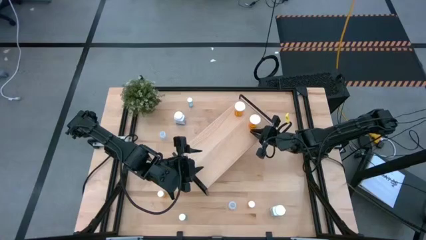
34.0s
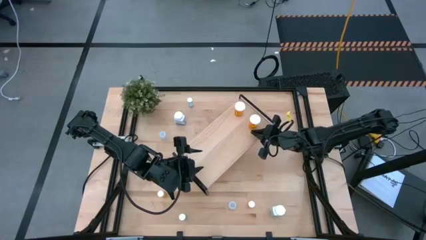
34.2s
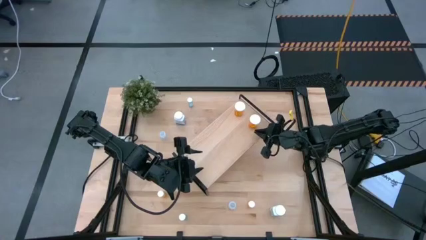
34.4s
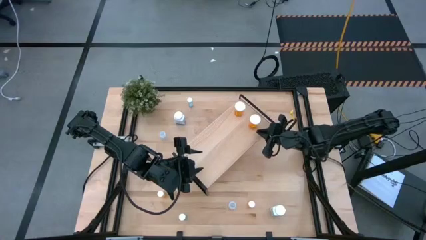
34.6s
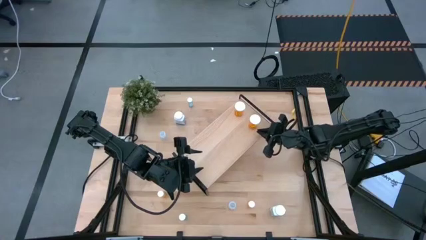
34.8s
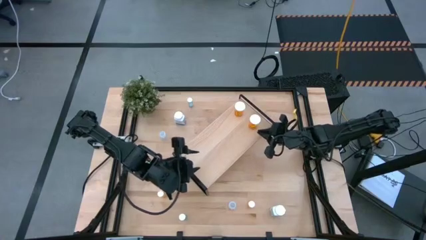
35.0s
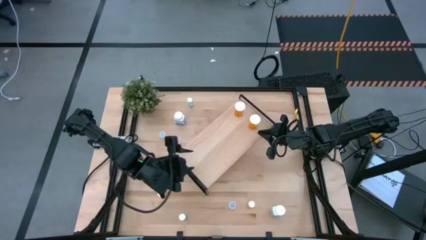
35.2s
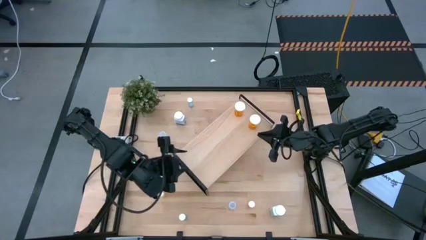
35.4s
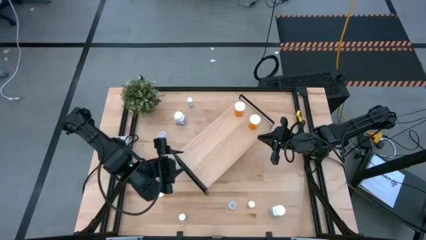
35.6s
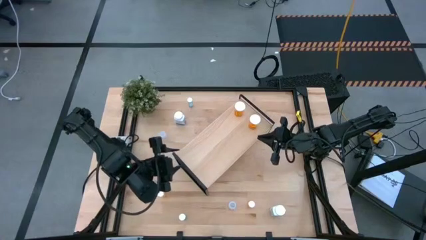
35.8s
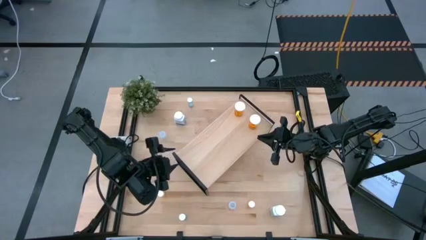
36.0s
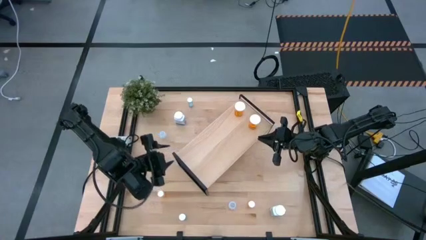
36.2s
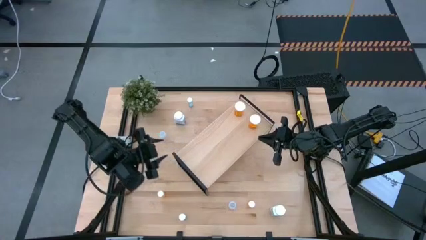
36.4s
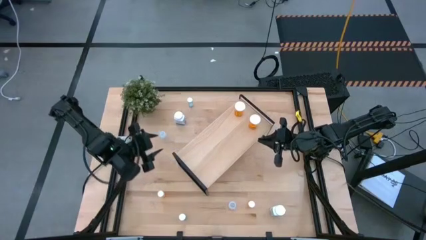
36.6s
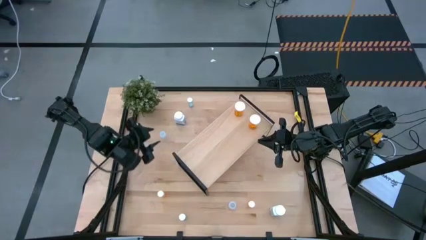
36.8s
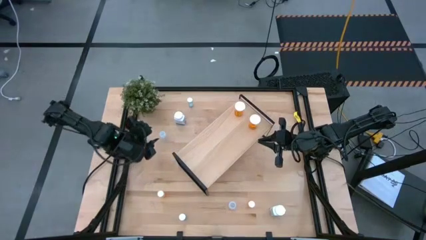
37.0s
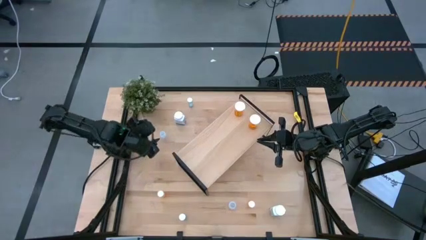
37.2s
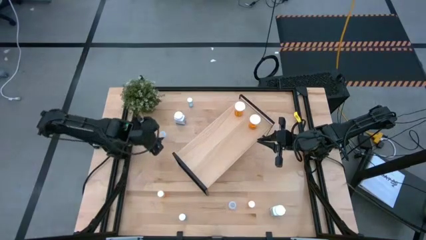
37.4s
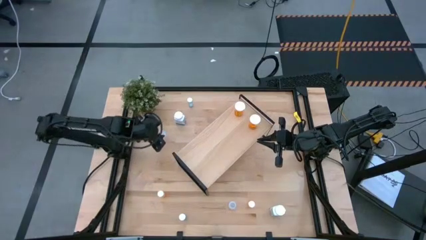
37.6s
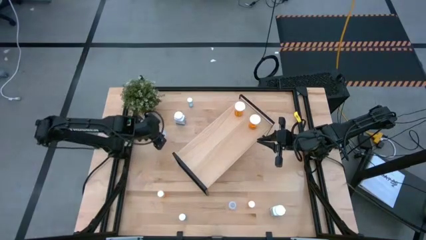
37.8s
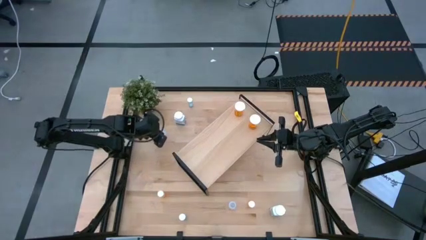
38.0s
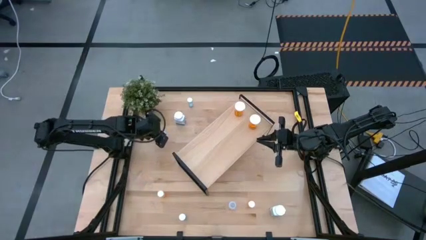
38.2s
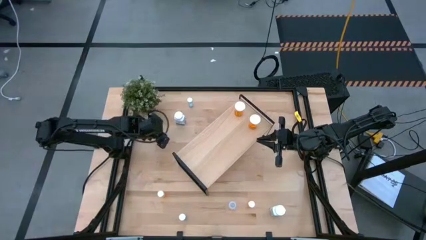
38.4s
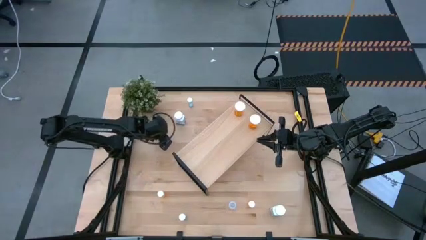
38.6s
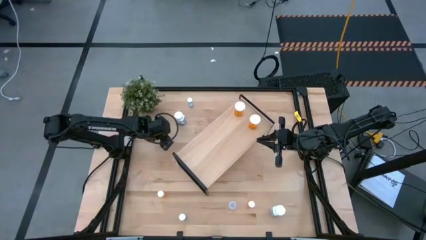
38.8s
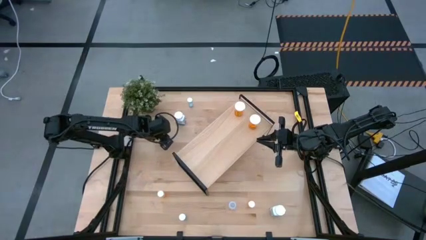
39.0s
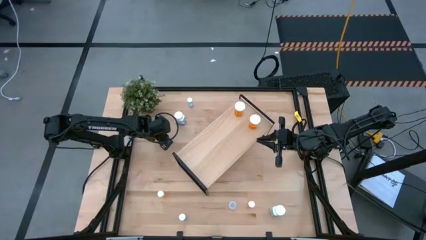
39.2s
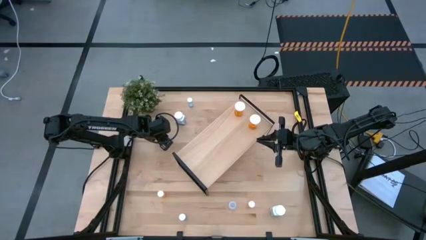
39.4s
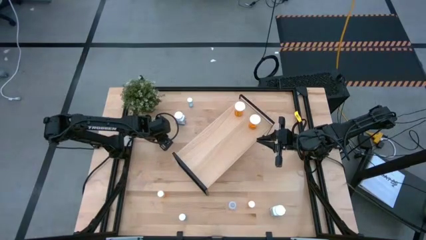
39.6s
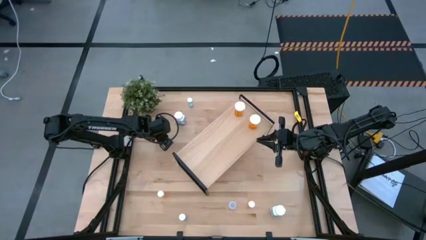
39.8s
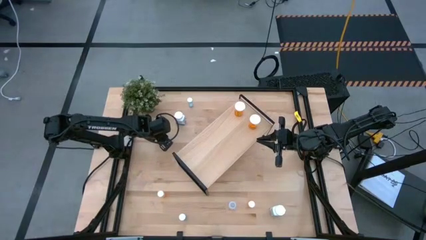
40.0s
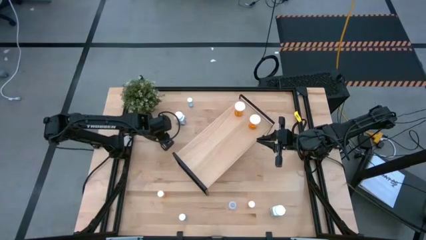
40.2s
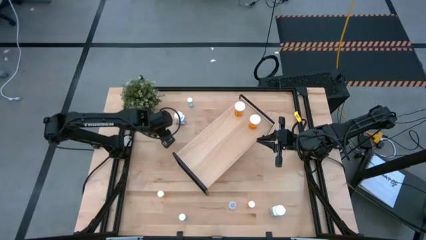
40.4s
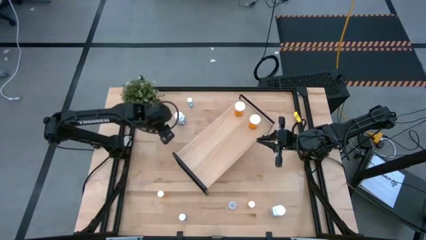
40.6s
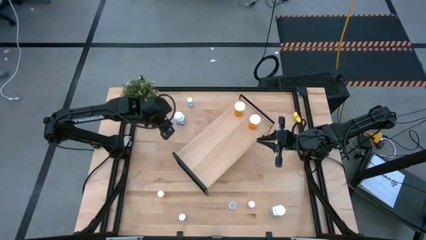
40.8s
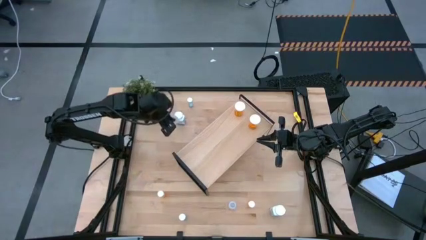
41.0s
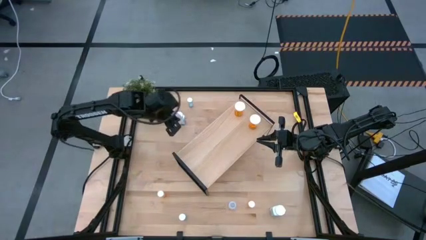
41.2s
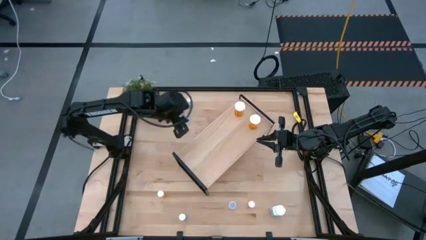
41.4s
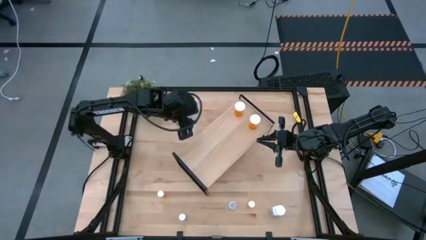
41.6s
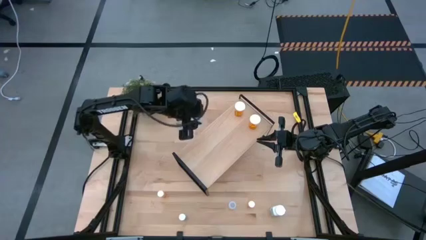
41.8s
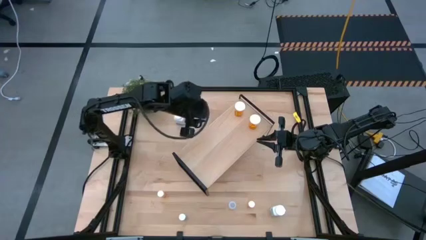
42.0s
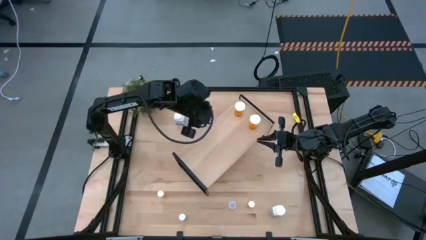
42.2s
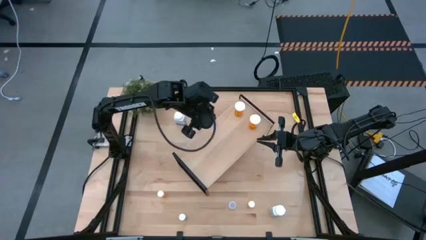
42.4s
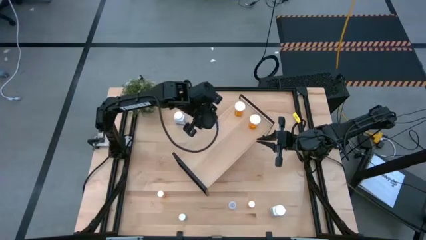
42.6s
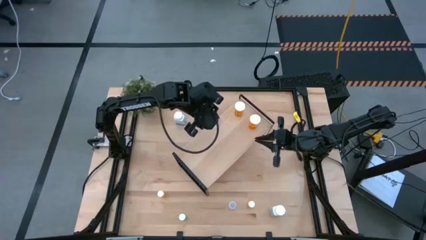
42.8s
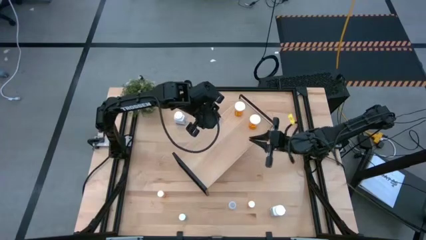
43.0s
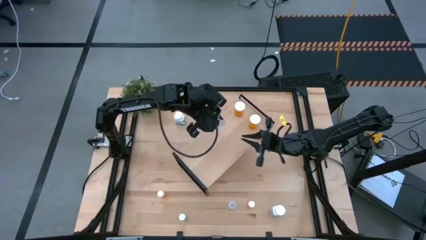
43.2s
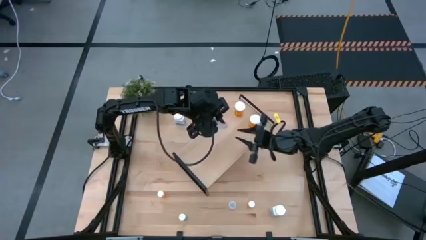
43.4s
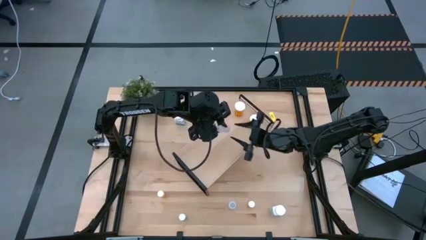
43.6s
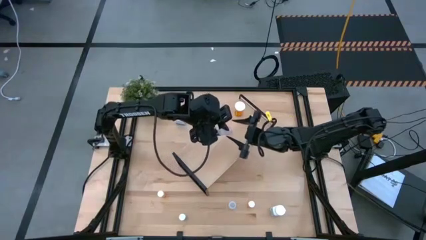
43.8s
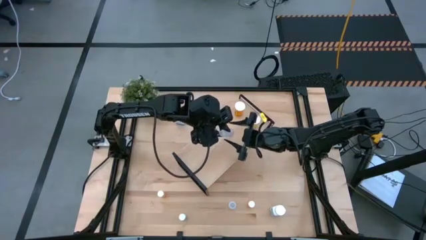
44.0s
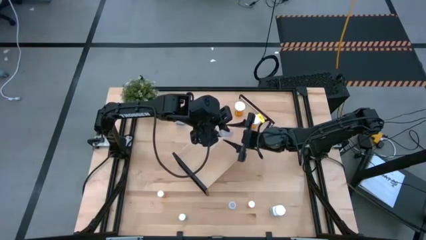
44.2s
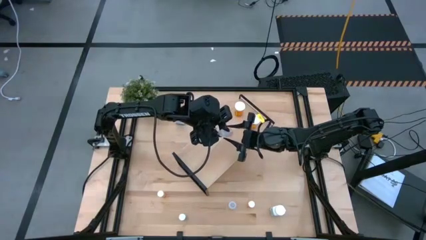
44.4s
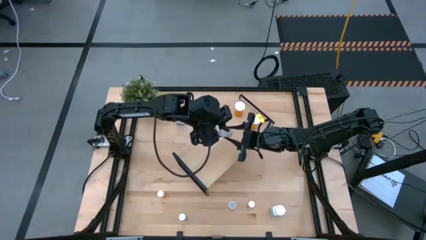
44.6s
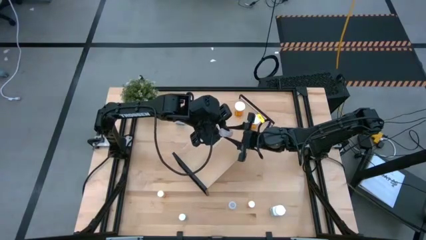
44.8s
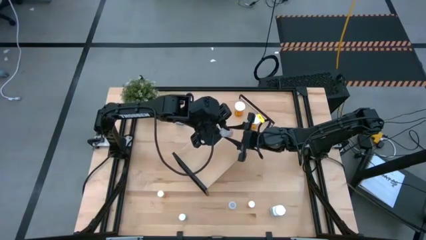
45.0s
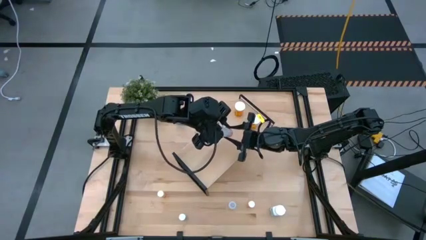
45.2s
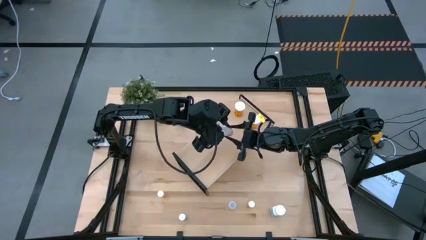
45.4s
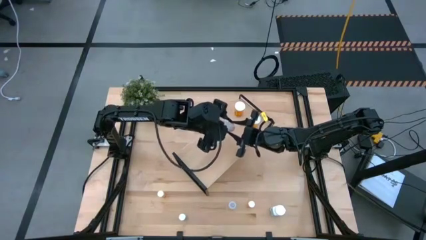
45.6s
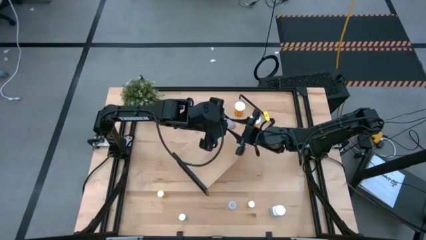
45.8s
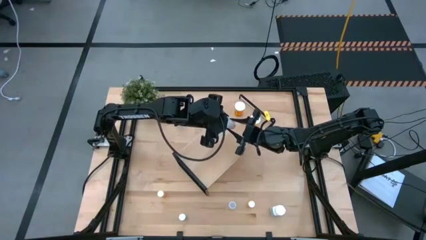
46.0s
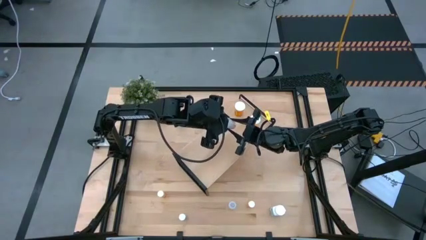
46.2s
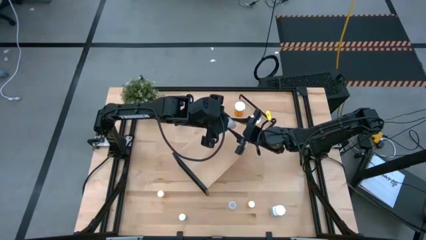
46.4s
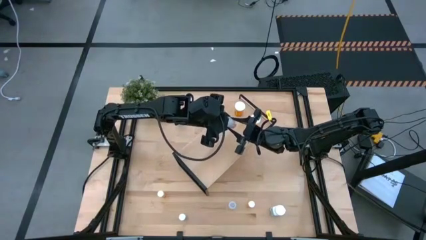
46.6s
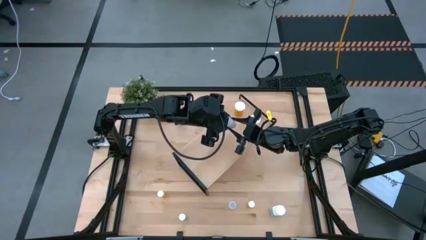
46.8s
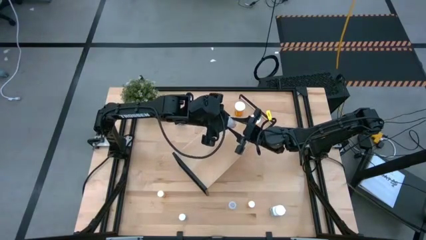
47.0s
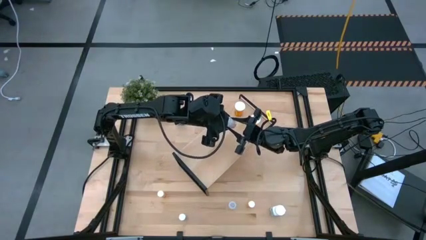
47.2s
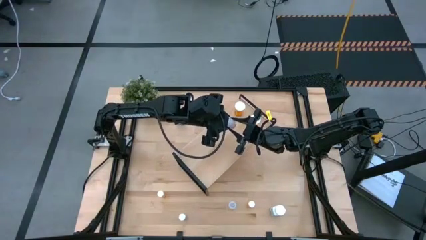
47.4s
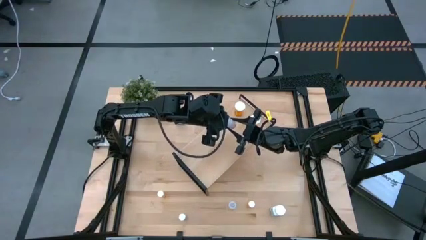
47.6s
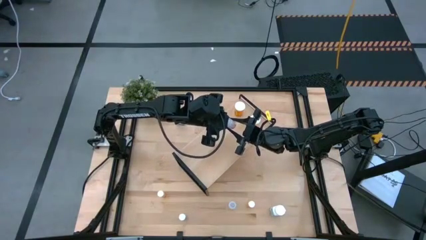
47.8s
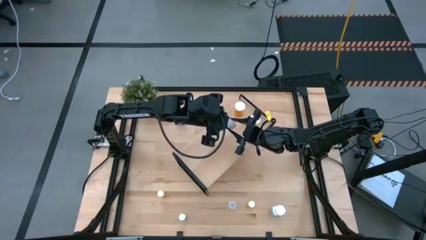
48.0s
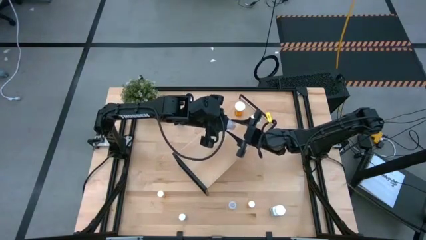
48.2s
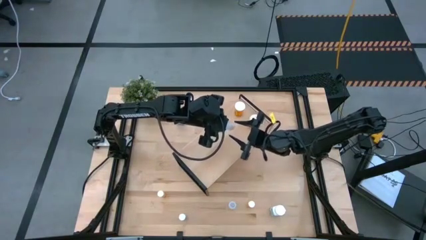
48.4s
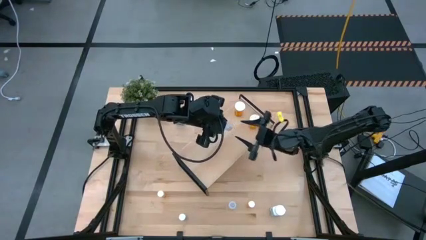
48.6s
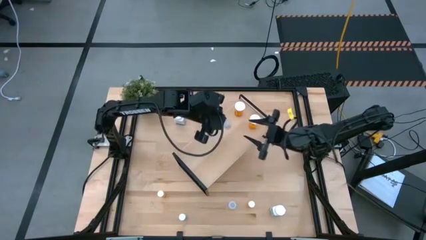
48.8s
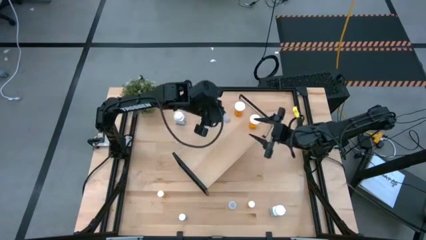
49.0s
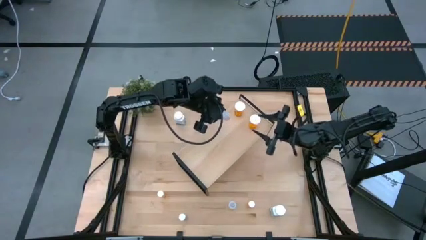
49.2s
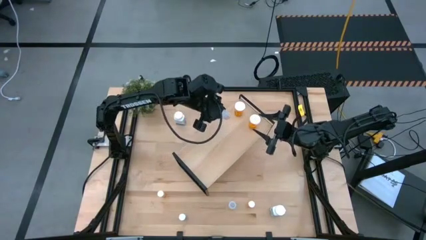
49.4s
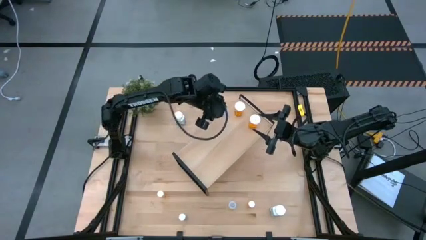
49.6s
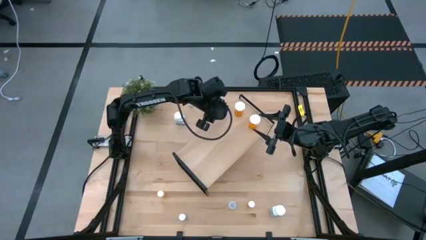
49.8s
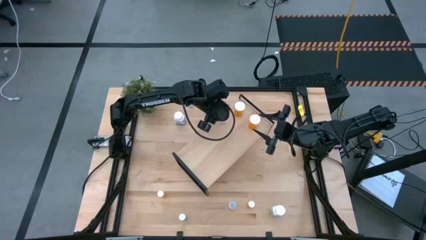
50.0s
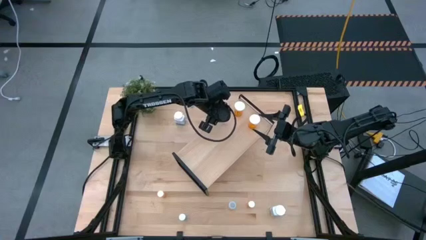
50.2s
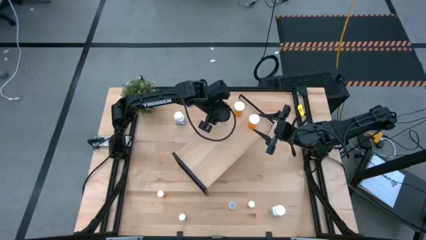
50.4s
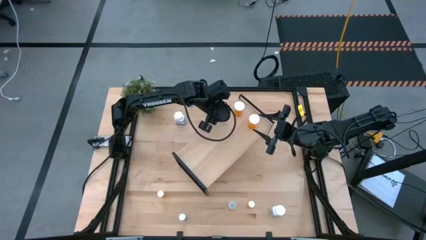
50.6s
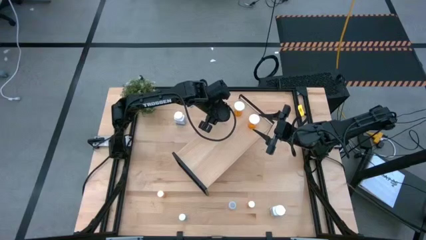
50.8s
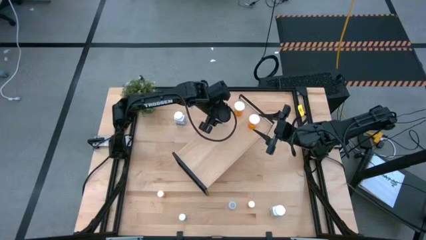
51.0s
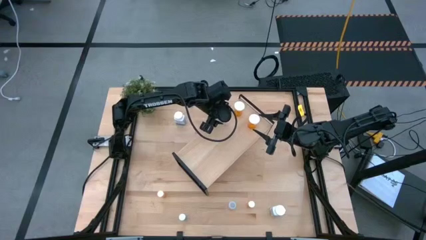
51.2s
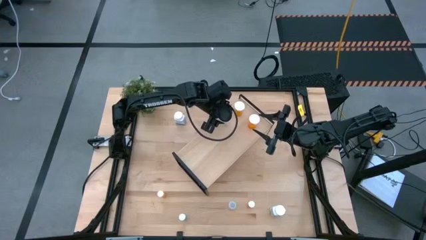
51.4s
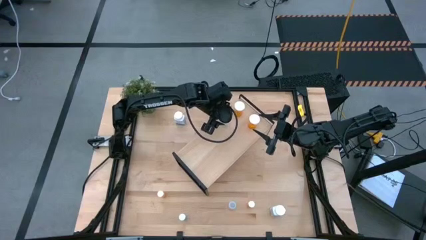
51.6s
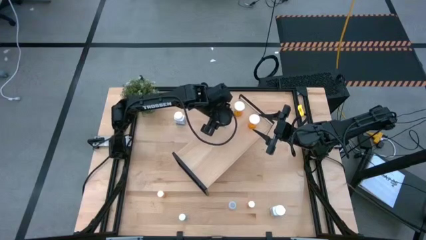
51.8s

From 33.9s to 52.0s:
Task: Pick and place medicine bottles onto shelf by color
Put the top transparent pill bottle on the shelf
